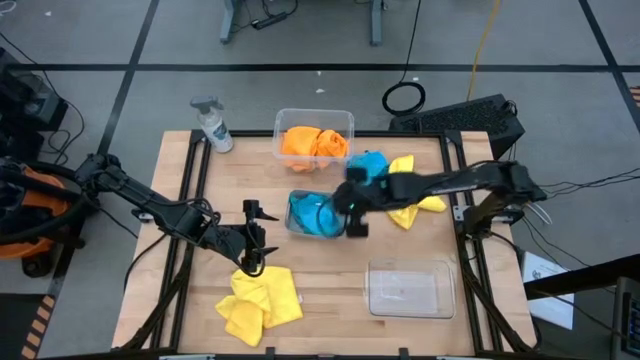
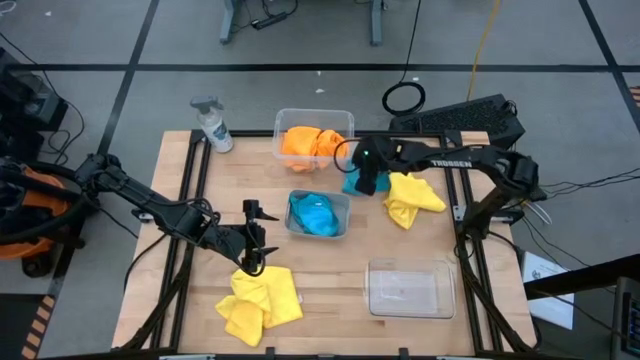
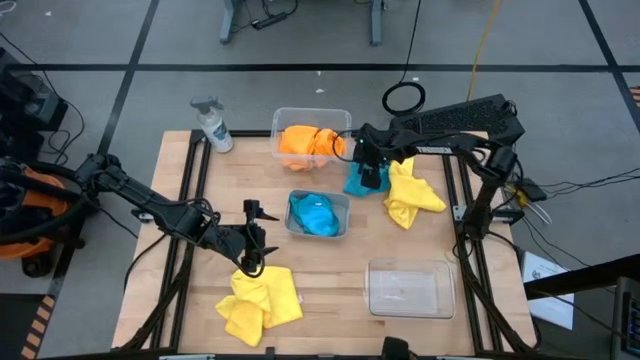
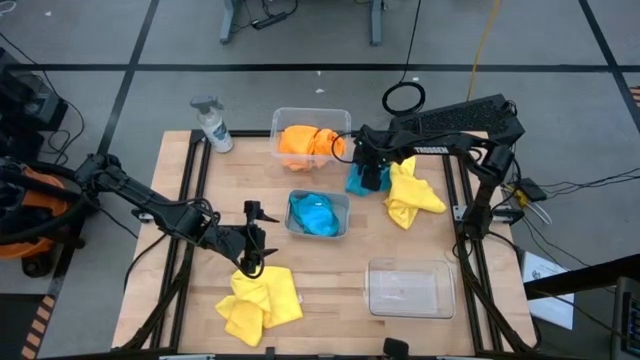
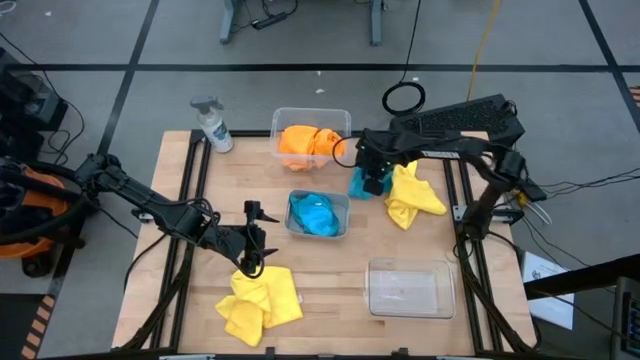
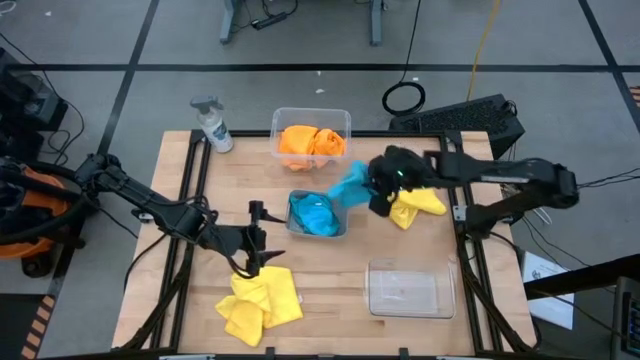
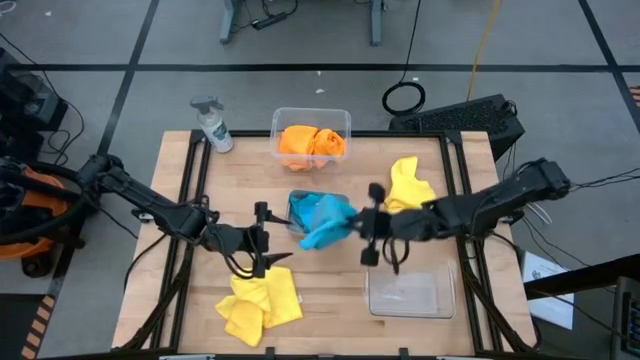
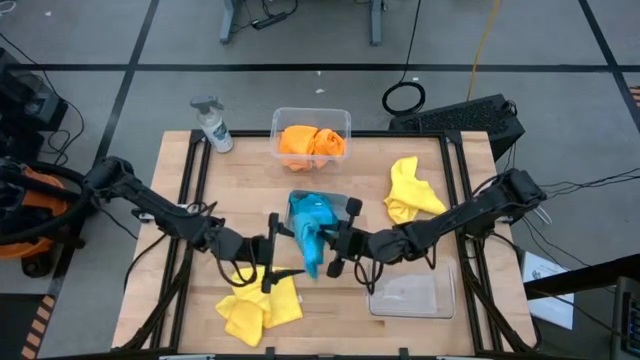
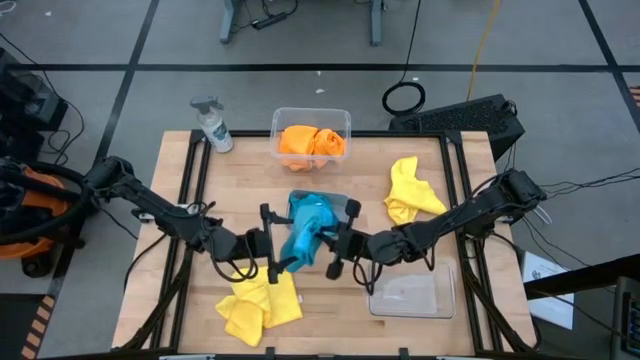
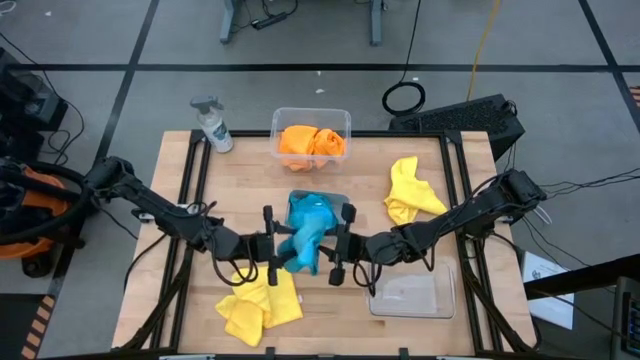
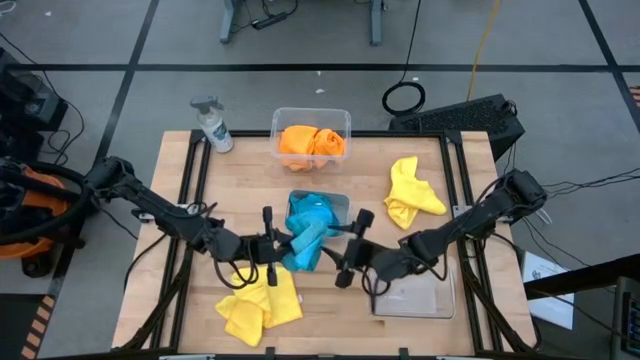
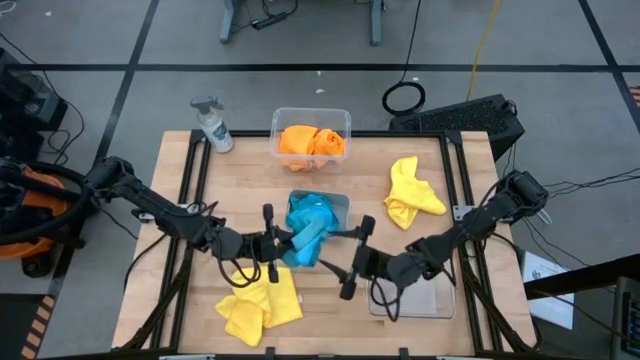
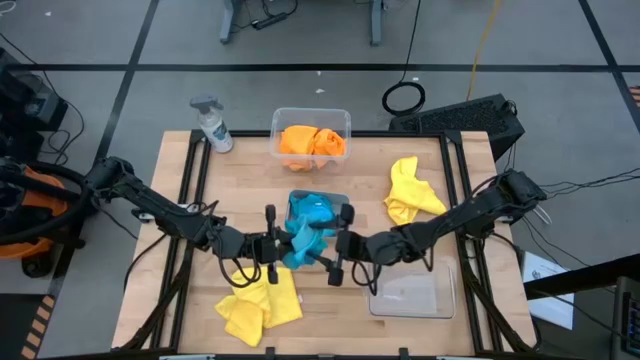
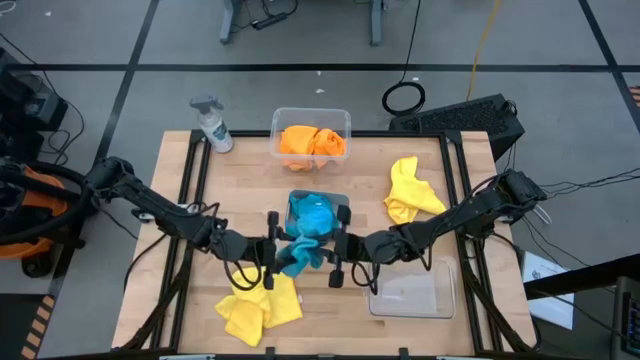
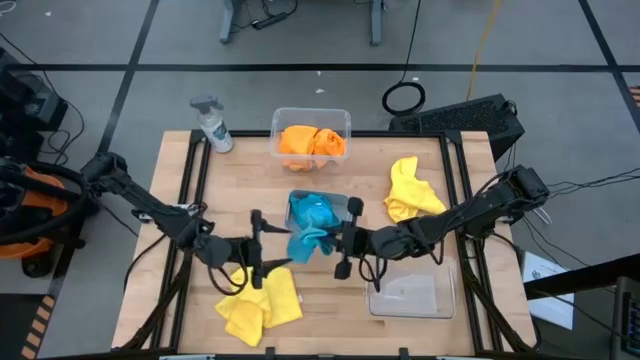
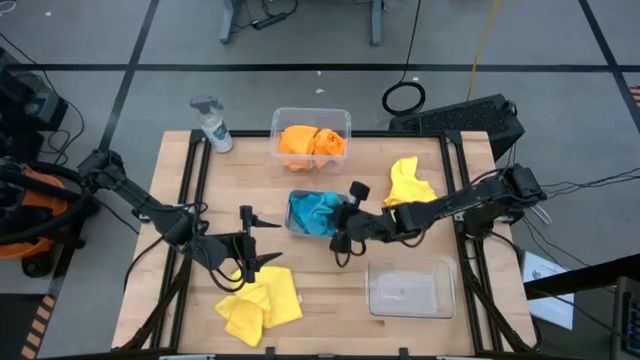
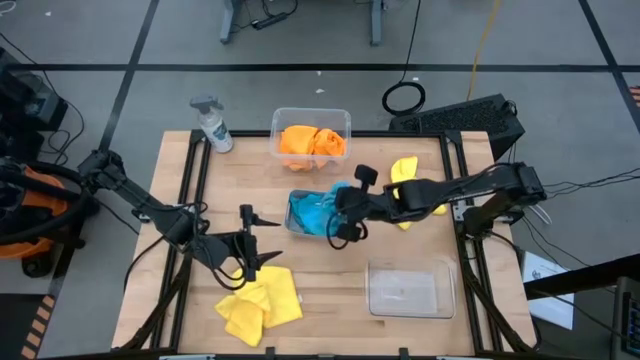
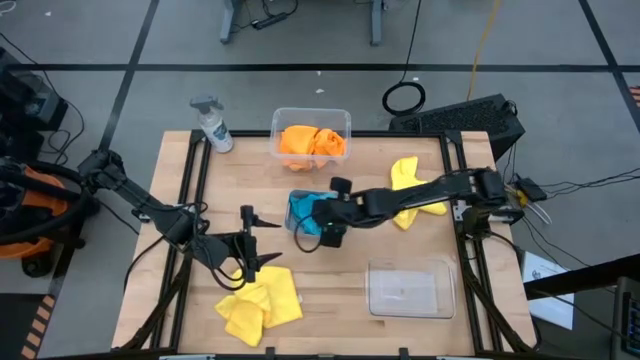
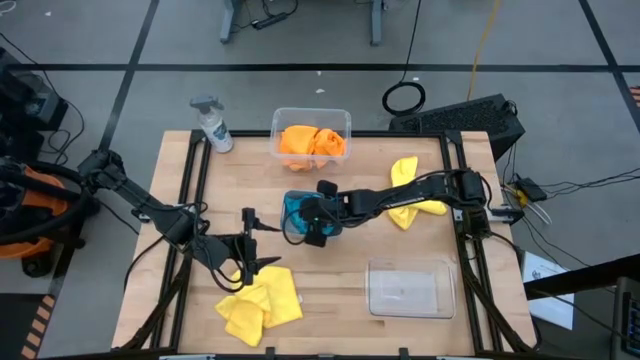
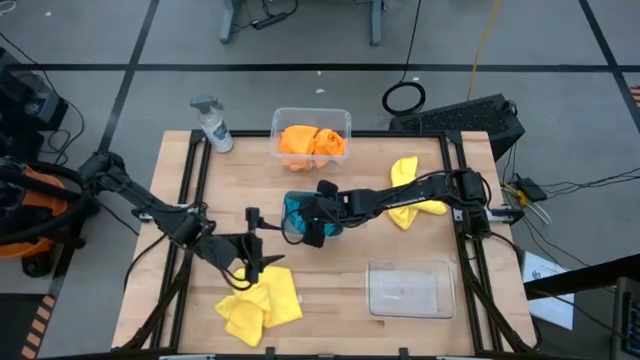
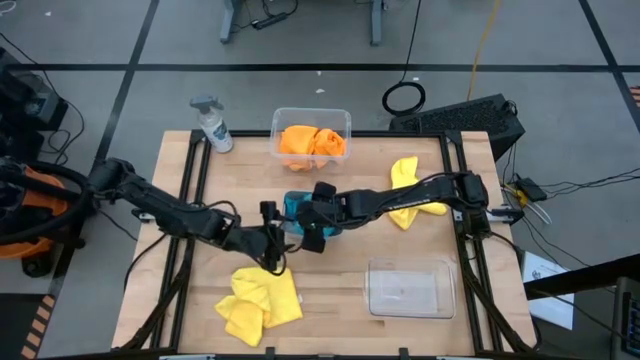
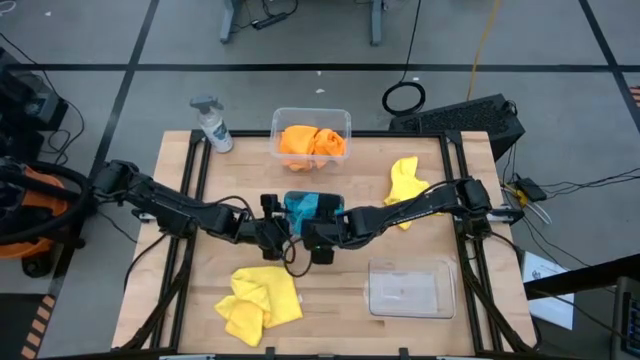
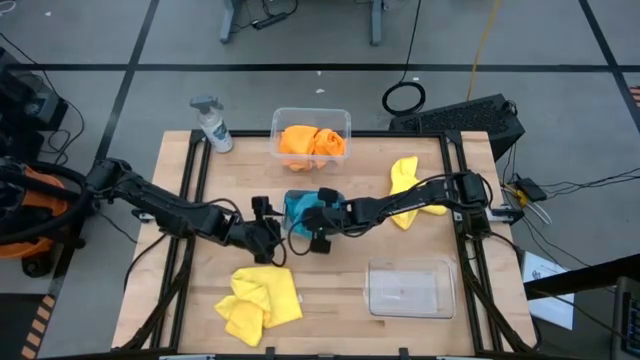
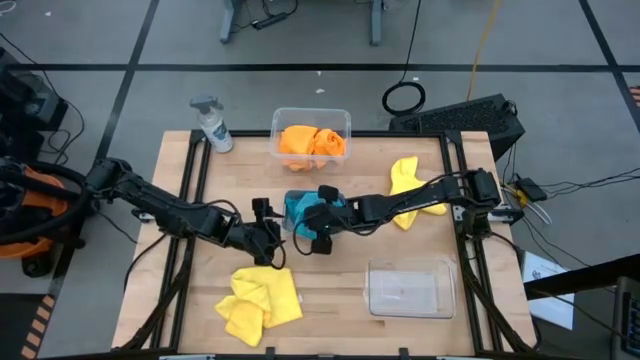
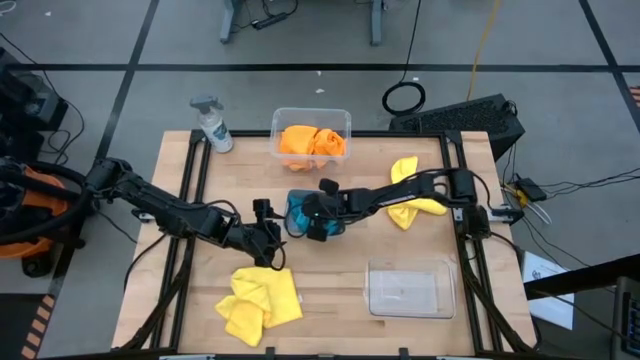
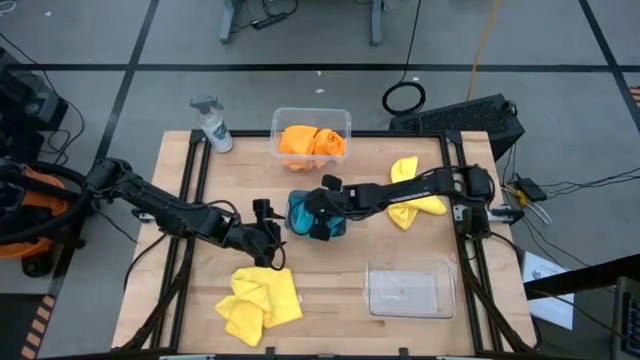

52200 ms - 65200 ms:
Task: Sort microfiber towel by color & place in baskets
Put the blue microfiber towel into the grey bin
